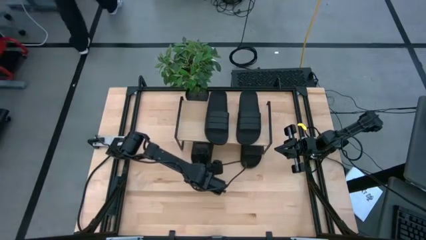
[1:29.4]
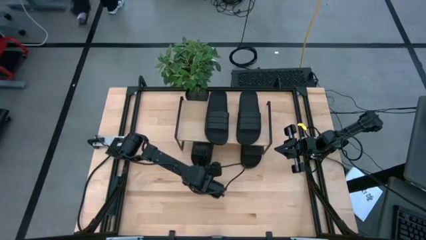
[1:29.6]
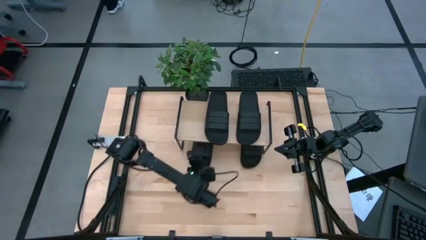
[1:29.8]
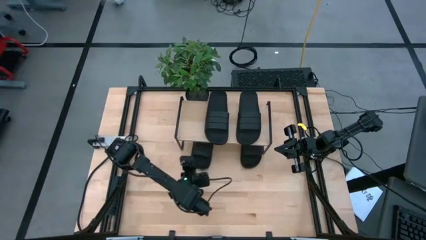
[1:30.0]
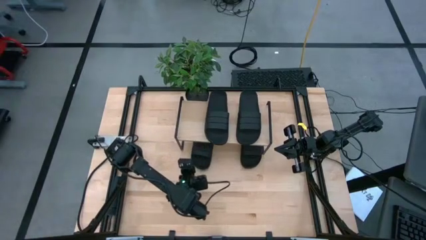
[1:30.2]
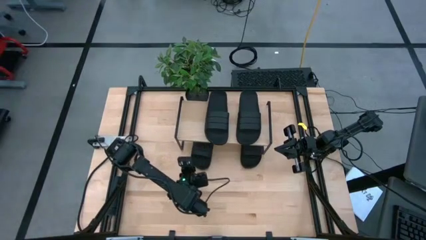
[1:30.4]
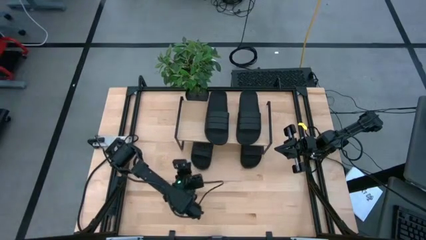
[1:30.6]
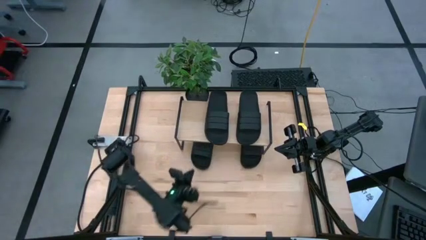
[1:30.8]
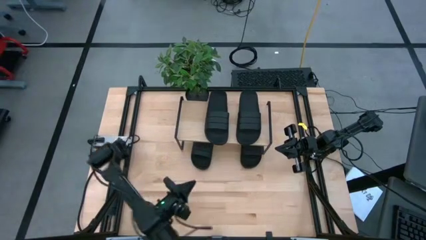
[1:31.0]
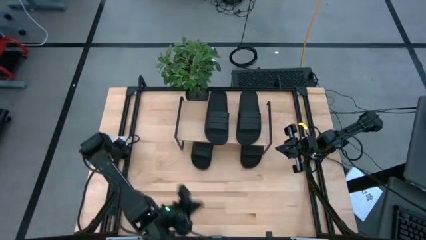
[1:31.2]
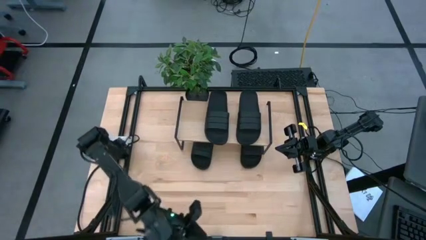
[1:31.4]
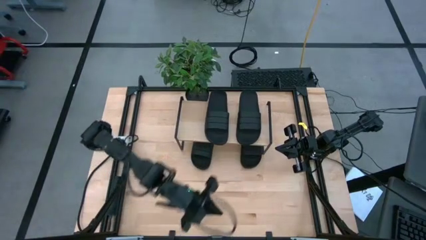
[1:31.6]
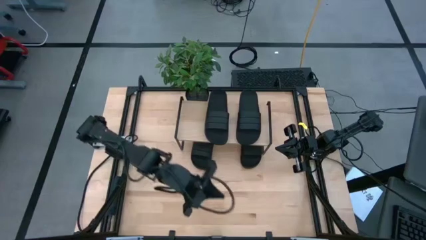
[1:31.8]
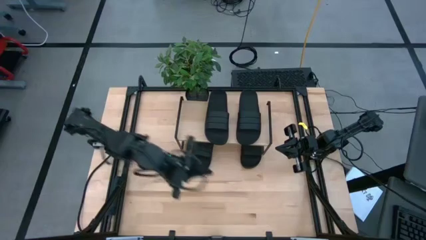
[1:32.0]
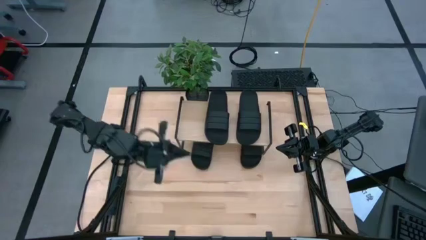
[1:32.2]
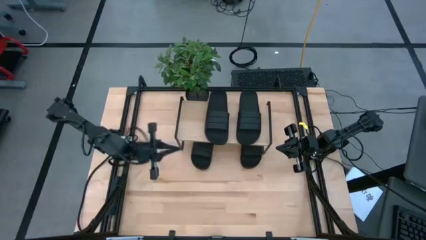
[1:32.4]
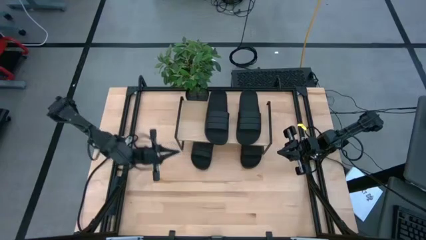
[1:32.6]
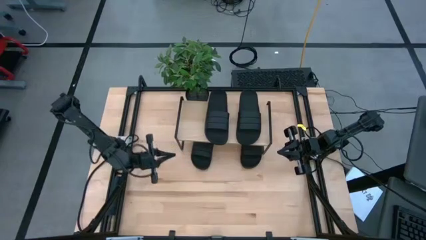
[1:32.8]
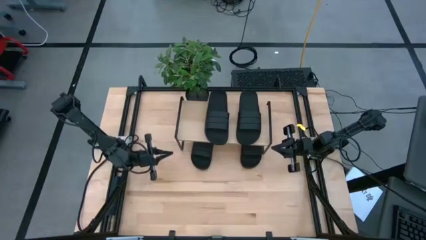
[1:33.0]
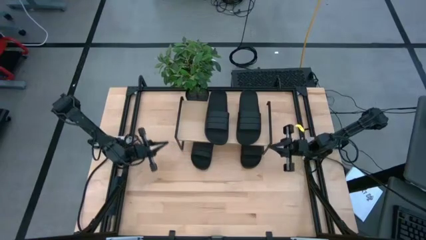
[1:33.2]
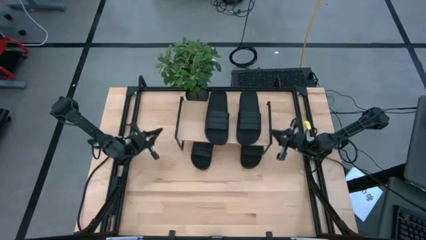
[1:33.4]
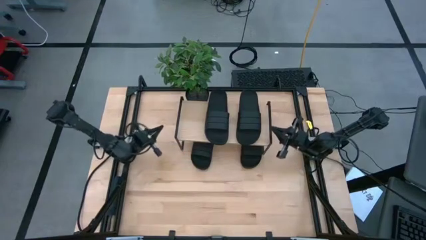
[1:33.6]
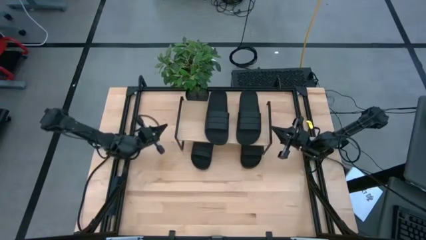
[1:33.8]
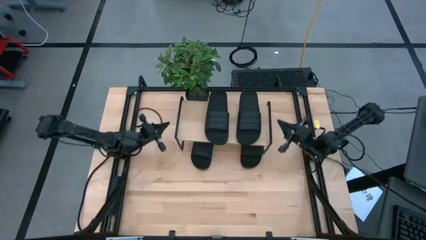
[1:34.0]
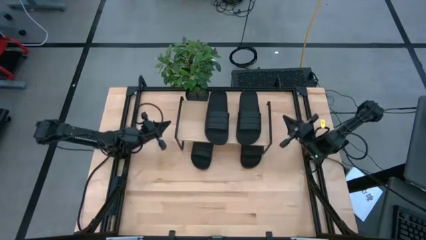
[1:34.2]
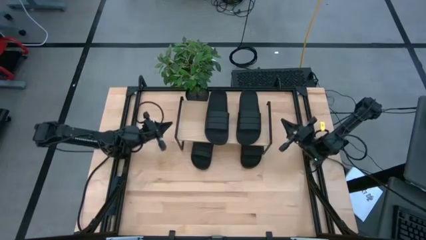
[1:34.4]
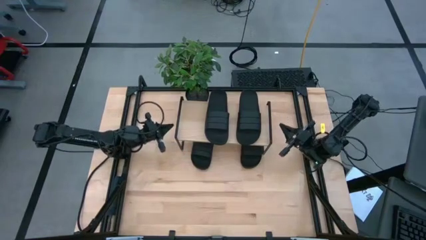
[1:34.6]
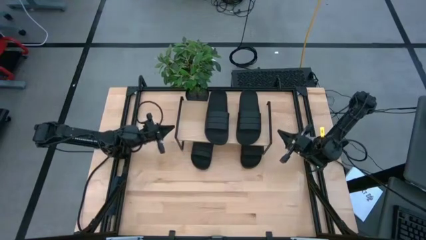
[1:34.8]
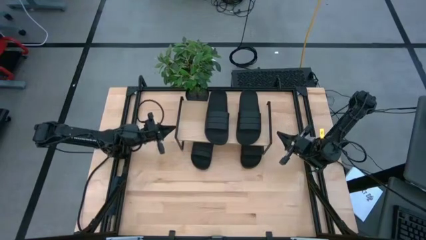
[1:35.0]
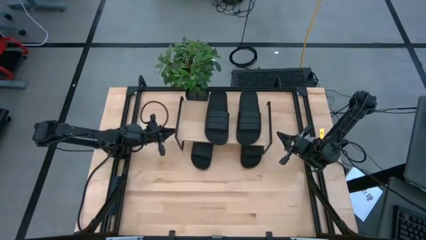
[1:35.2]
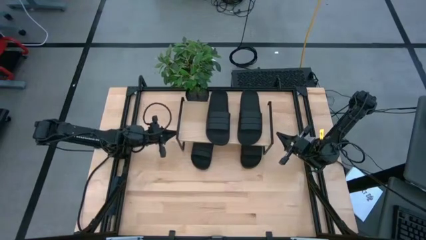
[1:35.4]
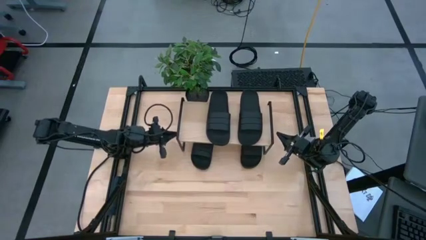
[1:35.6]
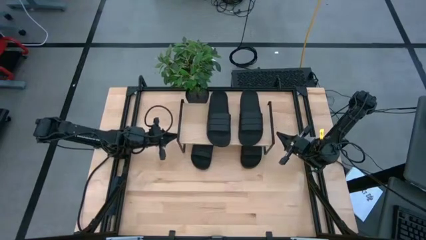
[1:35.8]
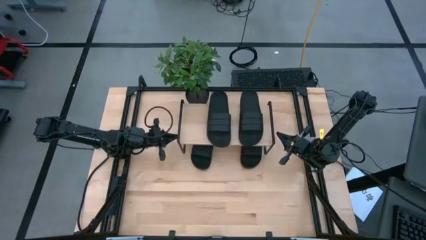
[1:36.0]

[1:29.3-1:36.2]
Task: Pick and place slides into the shelf
Adjust the shelf

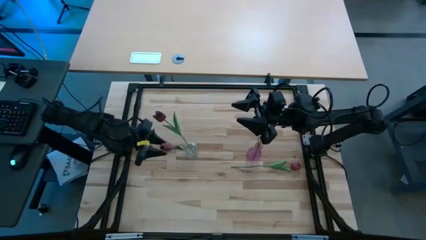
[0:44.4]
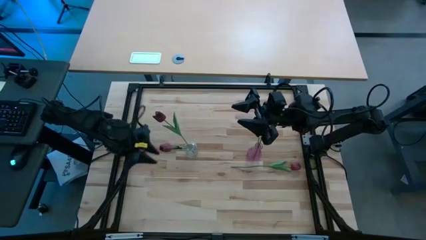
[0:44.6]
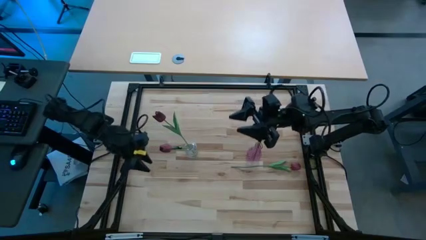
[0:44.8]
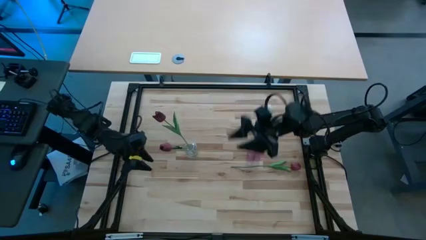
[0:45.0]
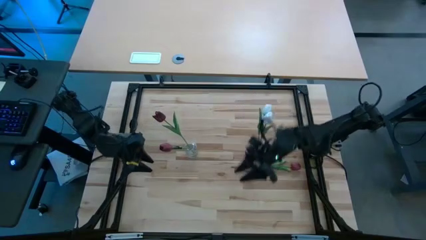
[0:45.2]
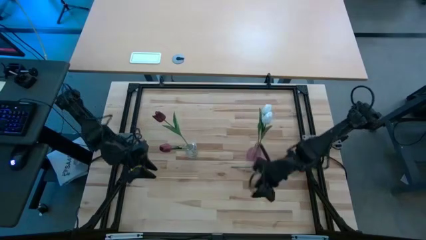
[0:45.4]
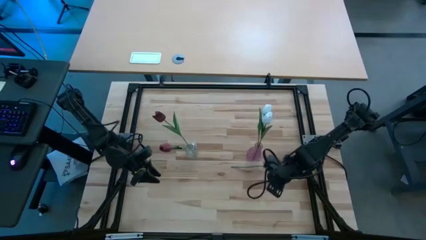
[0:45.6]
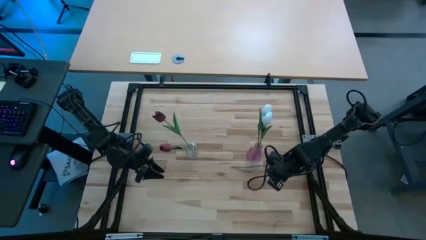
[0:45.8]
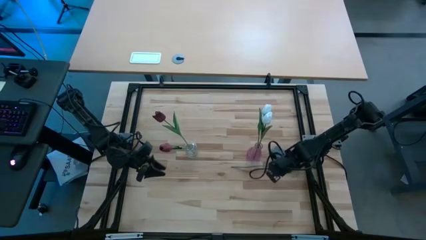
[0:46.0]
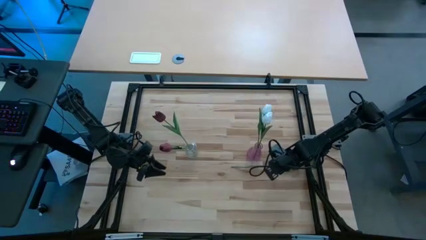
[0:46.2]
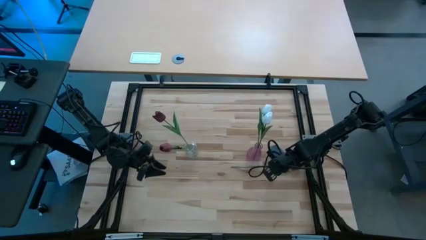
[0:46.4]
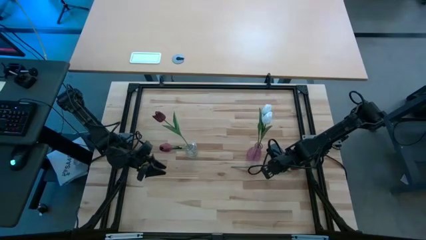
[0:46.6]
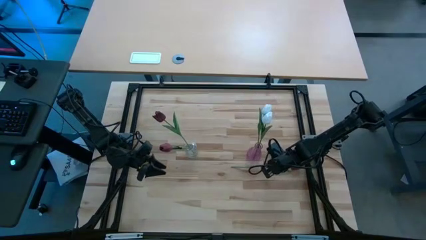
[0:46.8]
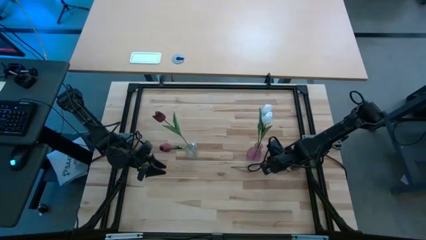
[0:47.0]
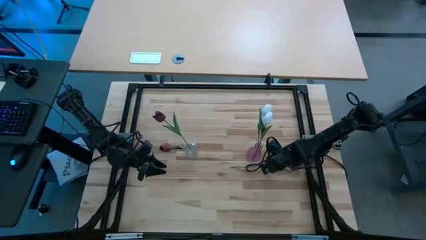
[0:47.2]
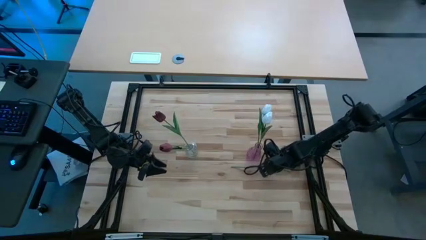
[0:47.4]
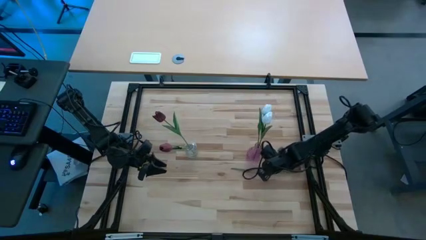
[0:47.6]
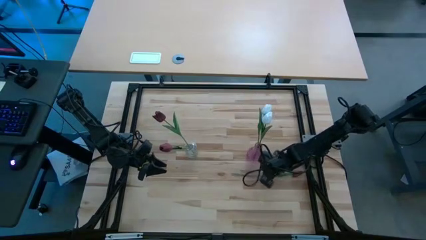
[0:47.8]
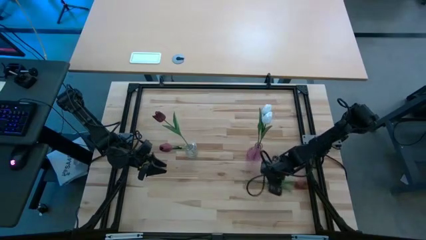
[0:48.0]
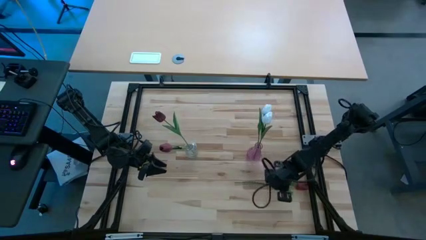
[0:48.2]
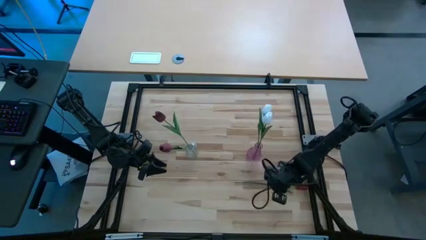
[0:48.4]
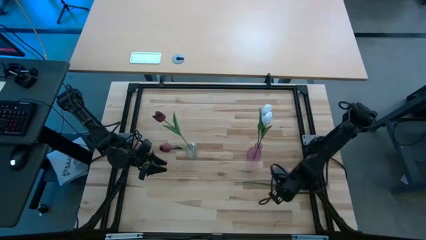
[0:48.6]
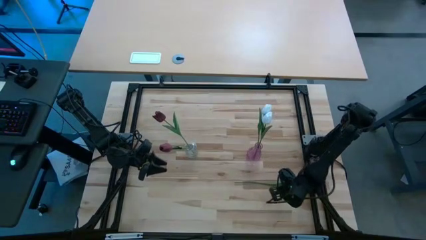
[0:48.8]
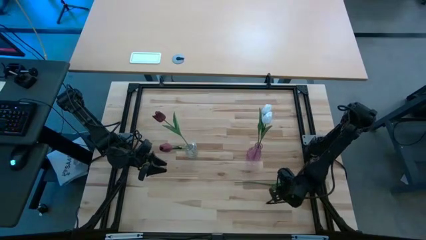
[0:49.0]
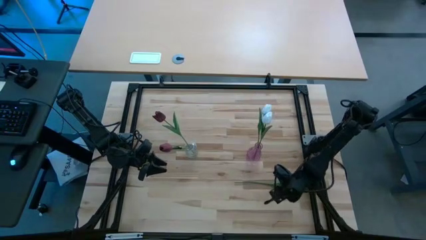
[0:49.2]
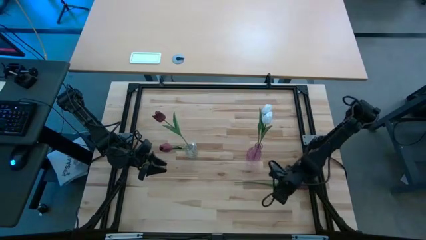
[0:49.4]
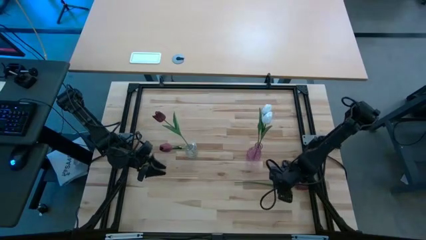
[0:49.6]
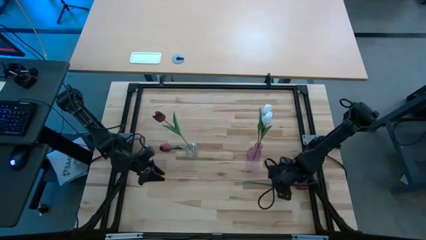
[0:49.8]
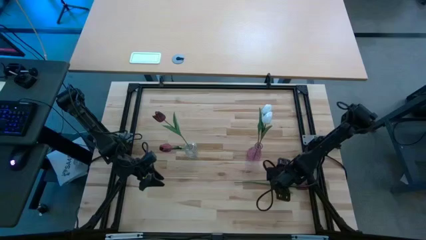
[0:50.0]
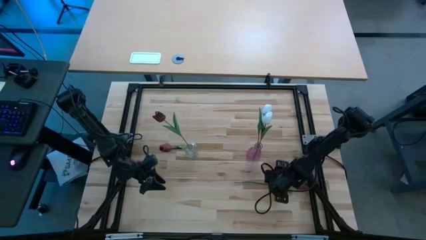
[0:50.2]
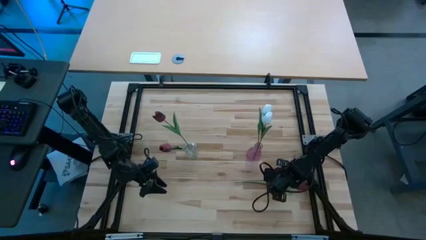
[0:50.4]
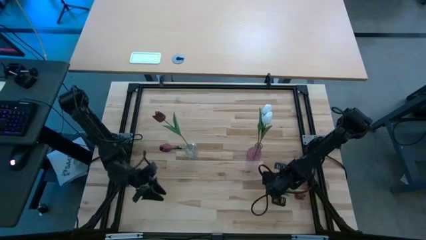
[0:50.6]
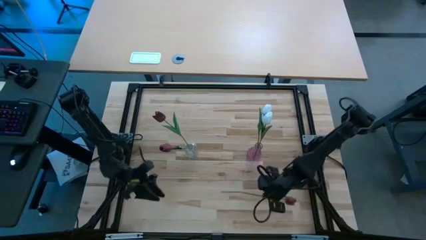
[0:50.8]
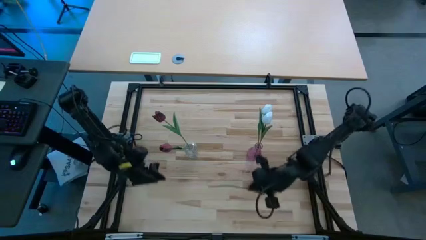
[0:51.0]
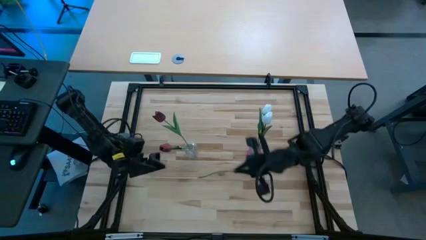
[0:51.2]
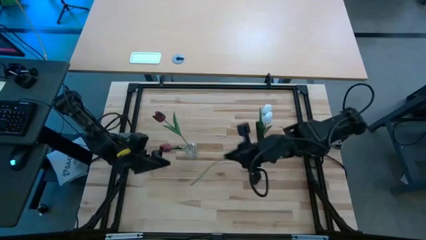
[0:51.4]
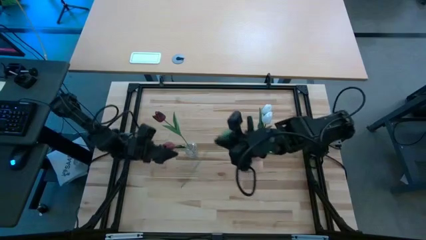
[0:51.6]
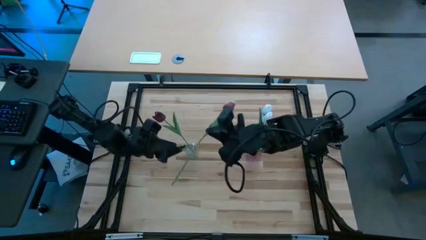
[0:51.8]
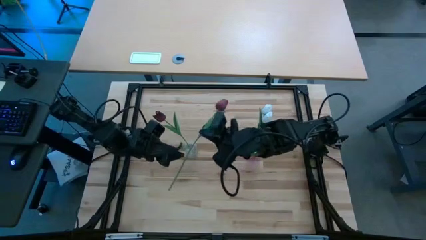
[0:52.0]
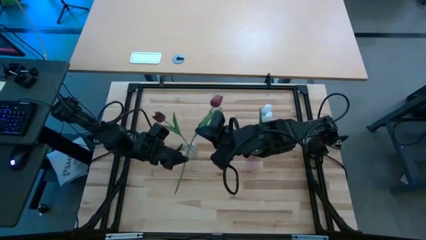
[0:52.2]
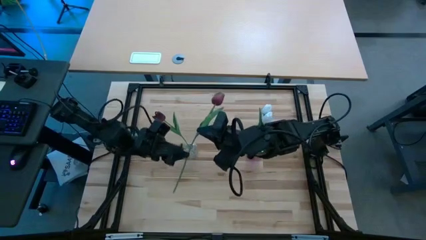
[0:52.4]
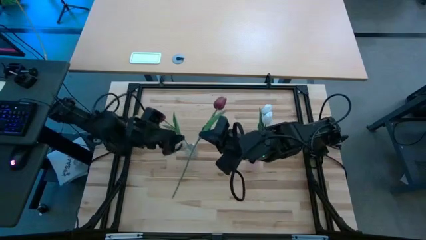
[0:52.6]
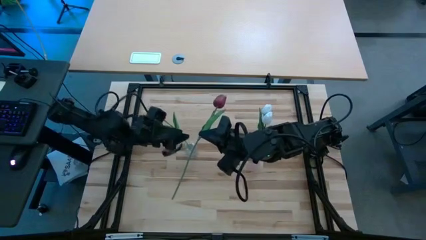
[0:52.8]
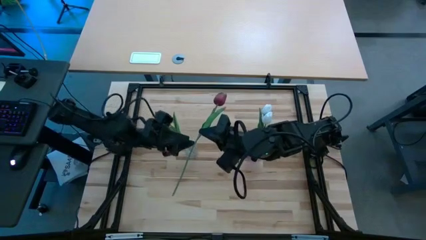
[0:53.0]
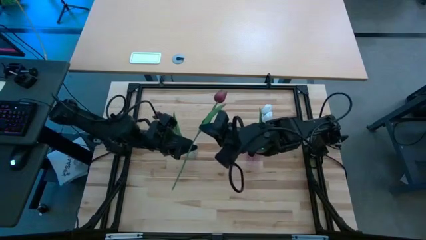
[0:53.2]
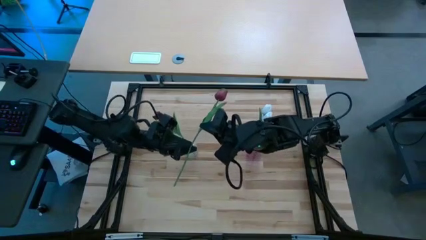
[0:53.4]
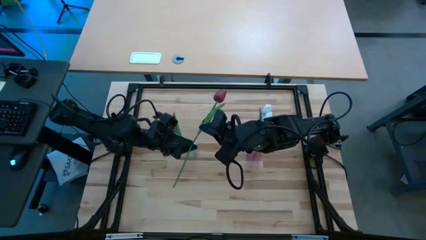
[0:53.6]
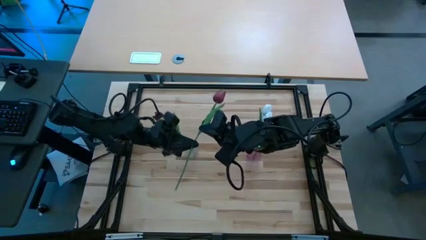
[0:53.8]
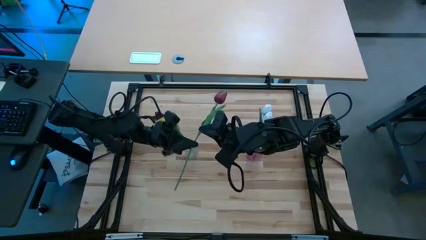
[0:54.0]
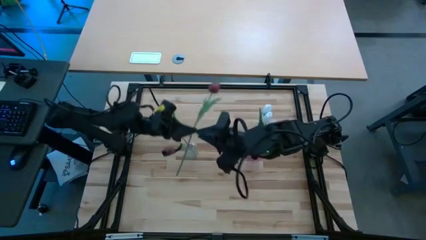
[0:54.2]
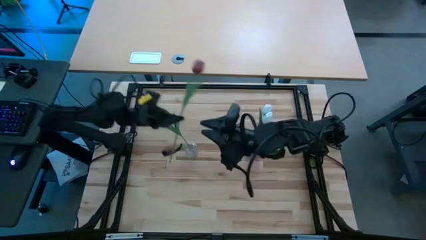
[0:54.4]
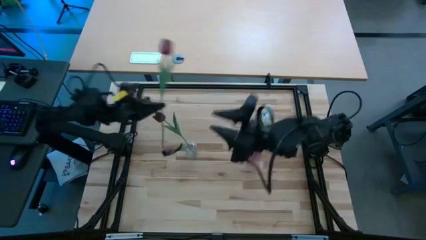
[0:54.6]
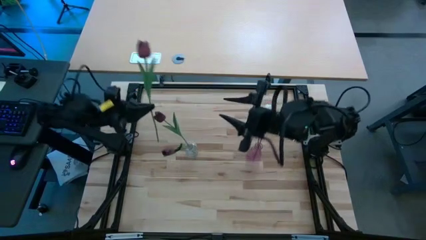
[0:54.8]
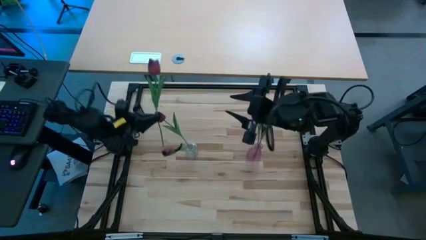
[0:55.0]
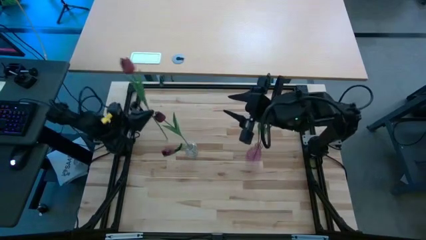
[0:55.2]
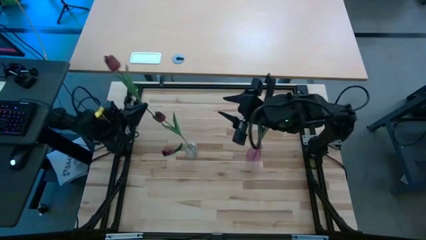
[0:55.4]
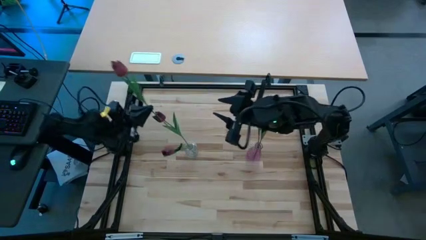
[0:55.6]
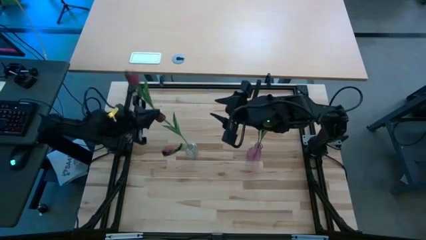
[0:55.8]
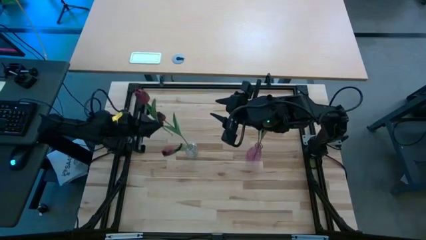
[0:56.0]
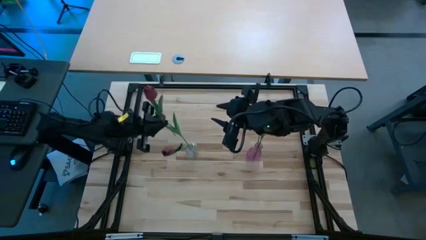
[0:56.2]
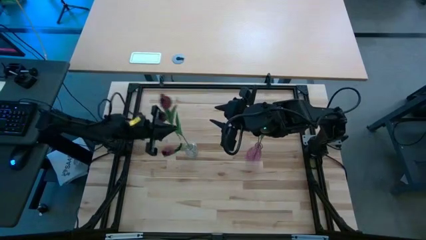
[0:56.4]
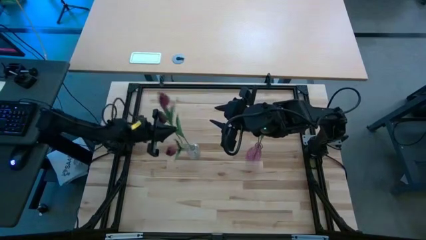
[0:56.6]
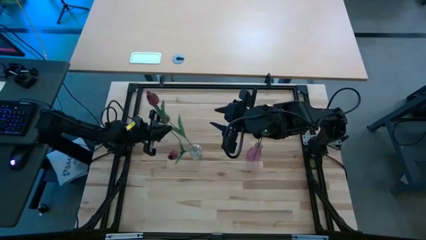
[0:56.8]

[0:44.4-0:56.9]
Task: Sort flowers into vase by color
Put the red flower into the transparent vase
